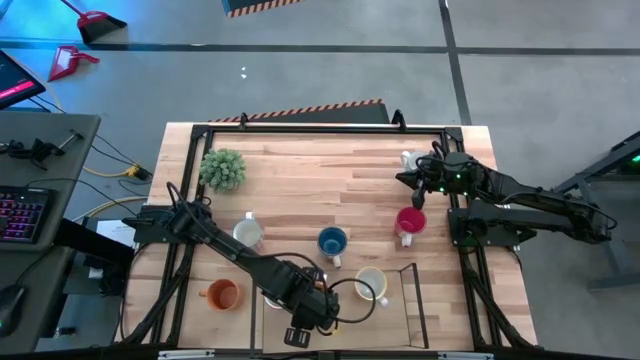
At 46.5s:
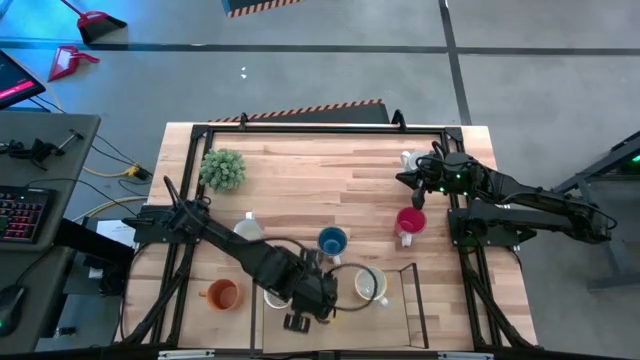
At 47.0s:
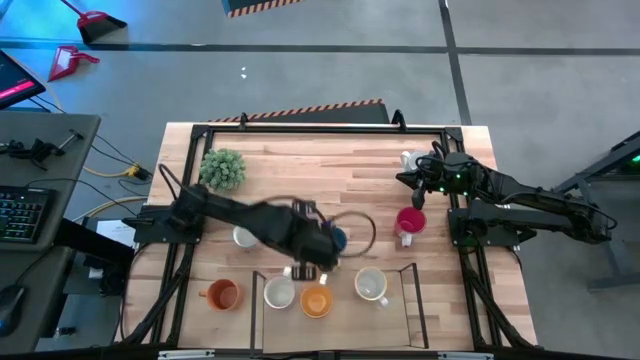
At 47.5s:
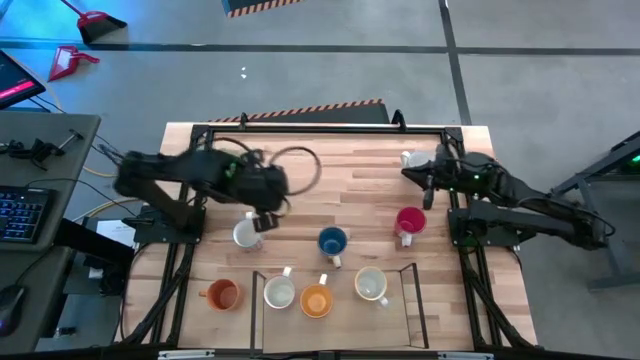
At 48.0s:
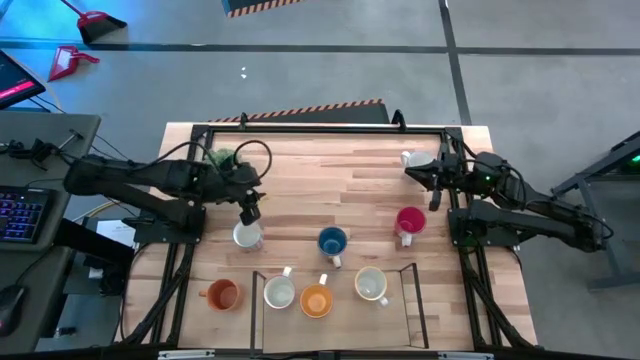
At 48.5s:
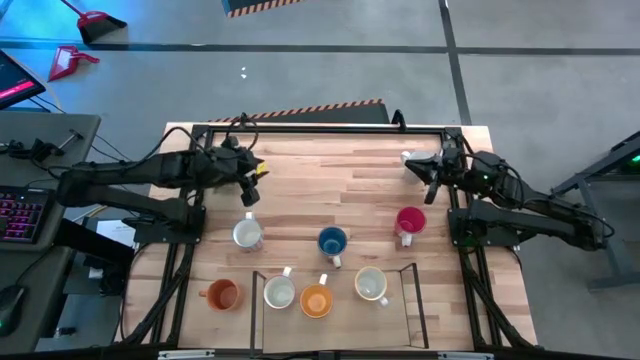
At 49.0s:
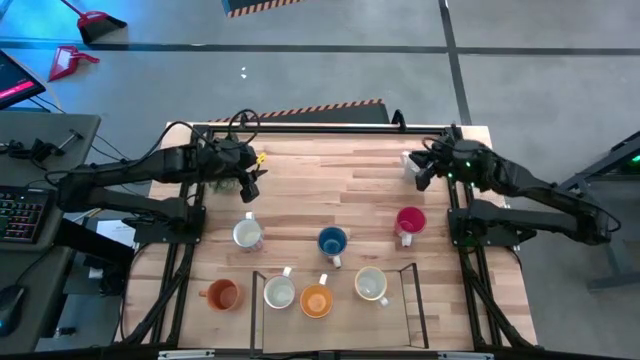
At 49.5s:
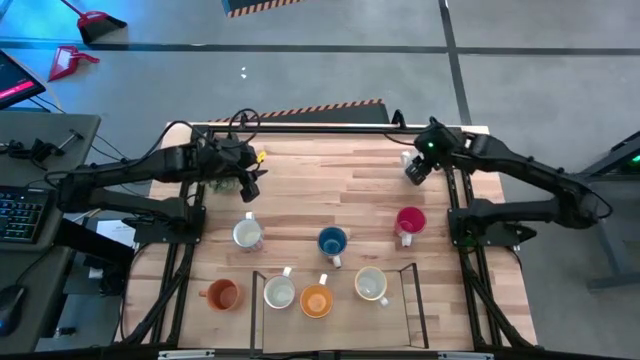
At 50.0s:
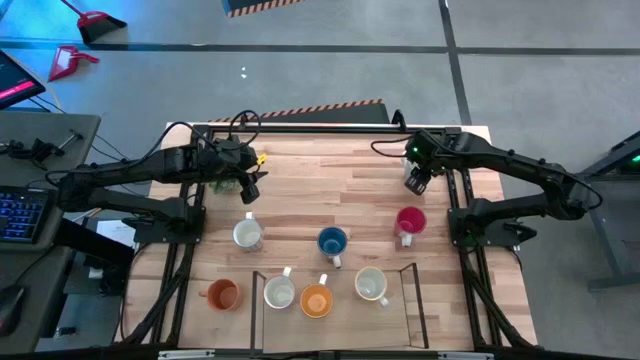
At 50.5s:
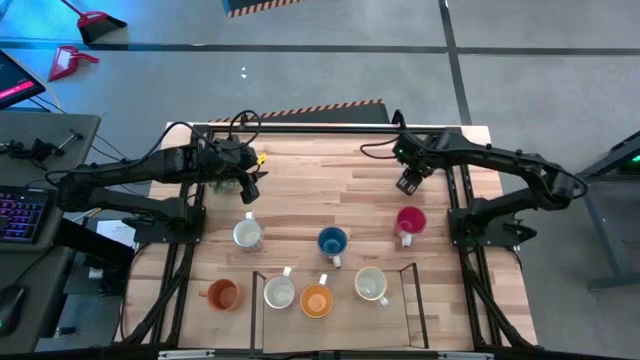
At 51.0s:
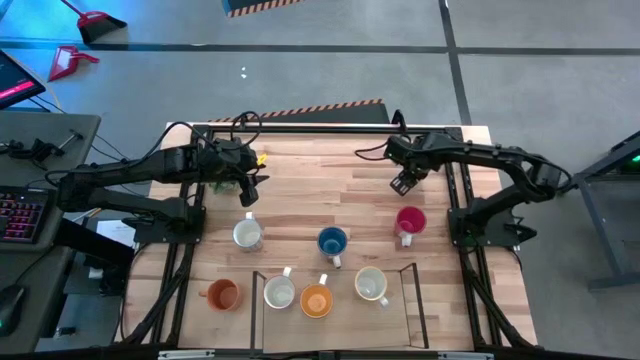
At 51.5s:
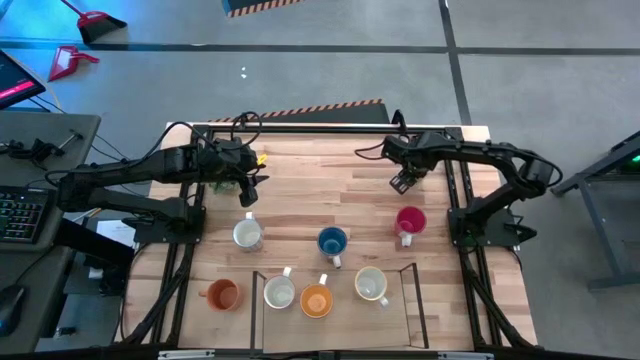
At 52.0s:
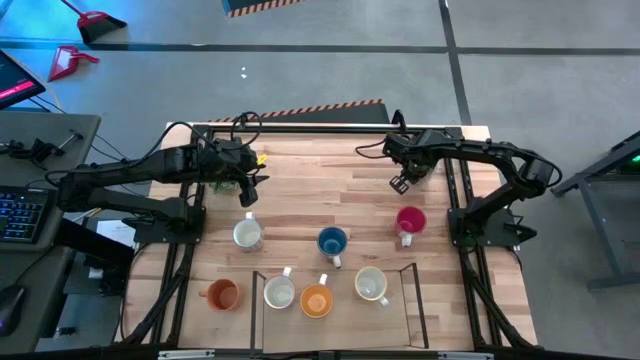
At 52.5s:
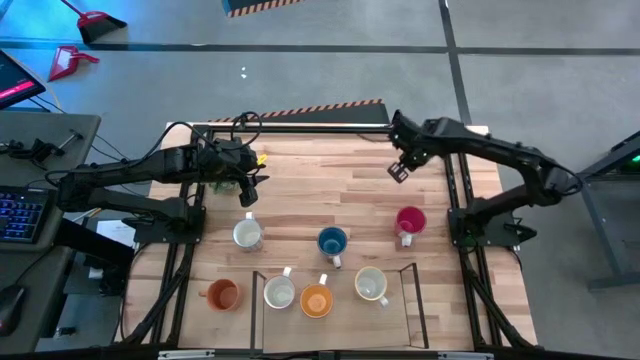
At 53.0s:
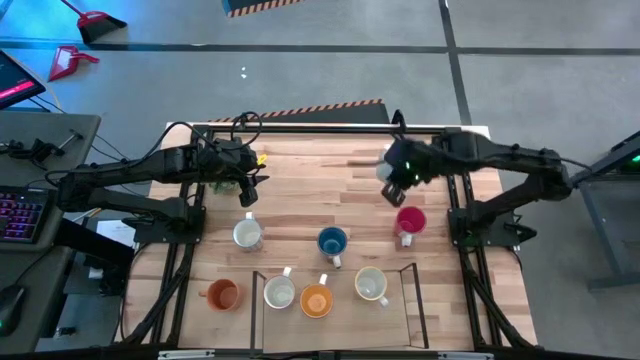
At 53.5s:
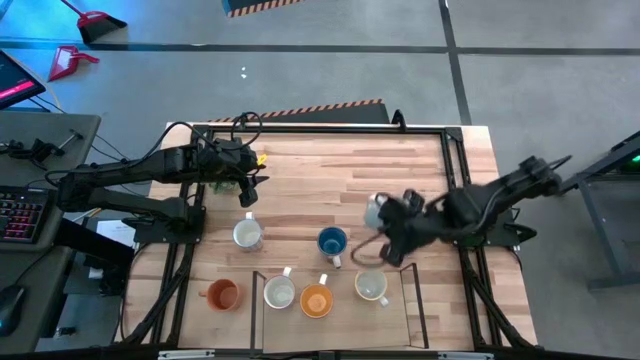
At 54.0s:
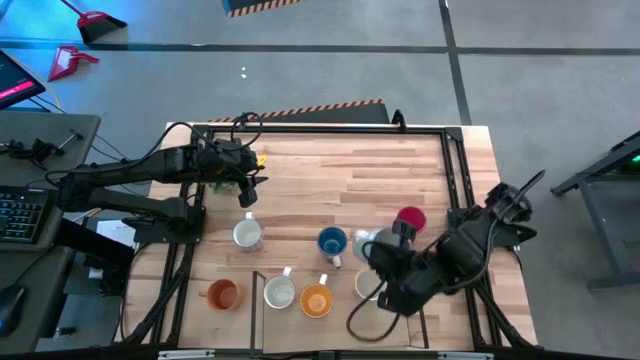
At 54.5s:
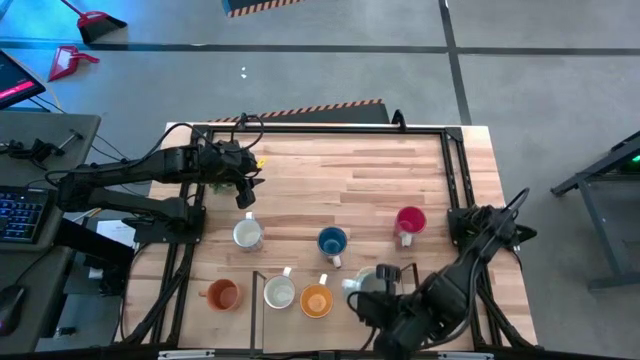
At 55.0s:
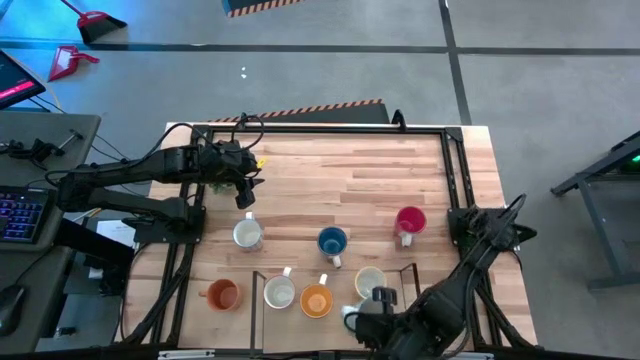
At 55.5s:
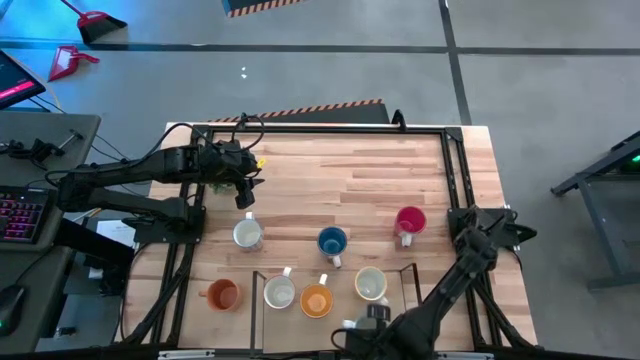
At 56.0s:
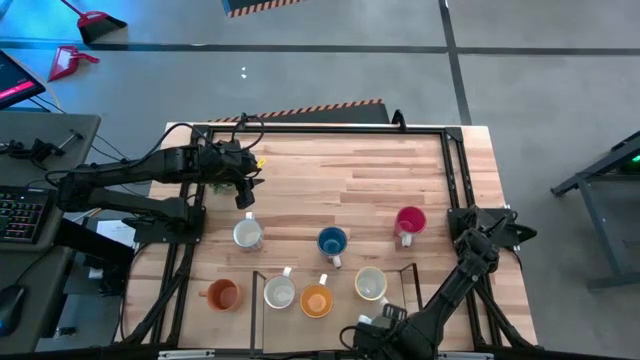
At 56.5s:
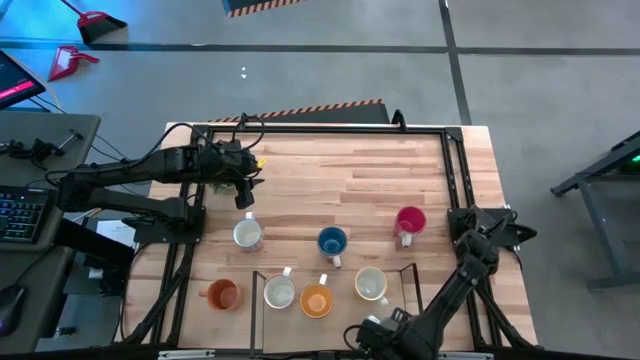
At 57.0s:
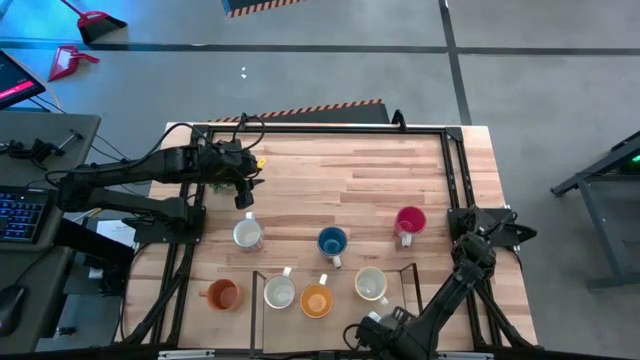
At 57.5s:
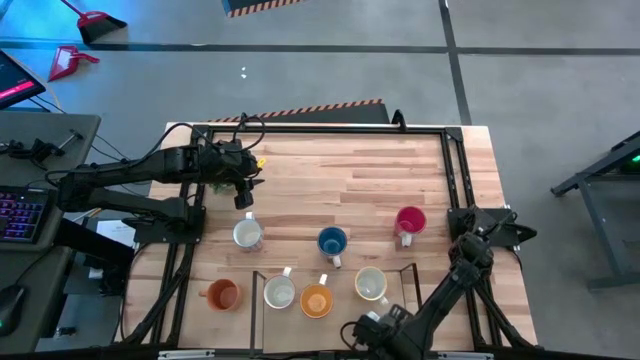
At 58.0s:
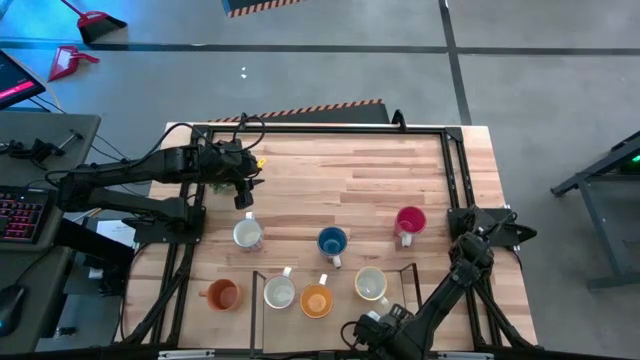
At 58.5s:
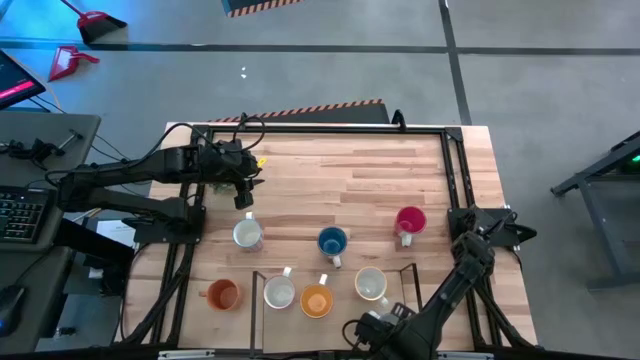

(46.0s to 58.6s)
Task: Place coffee mugs
Put the green pattern cup on the shelf

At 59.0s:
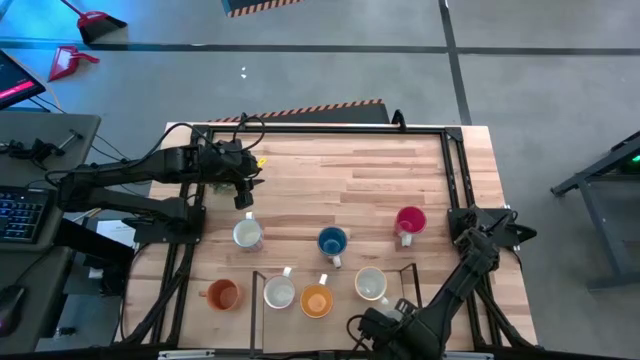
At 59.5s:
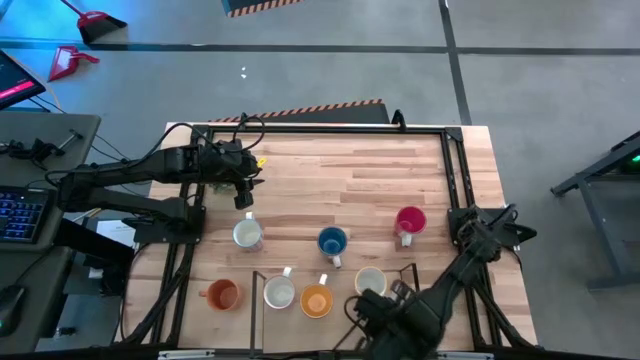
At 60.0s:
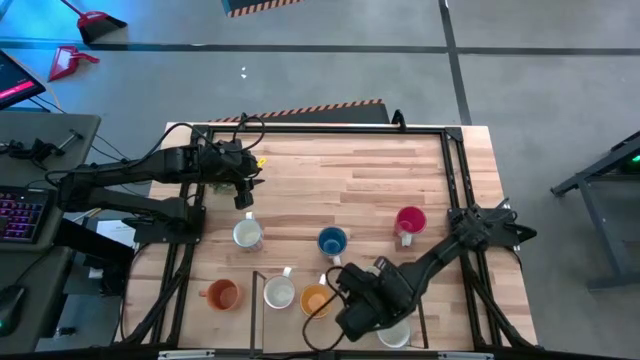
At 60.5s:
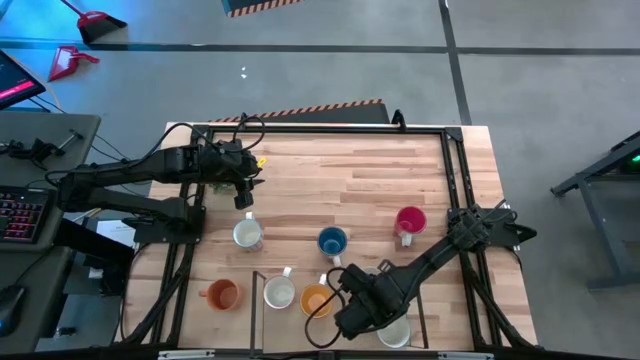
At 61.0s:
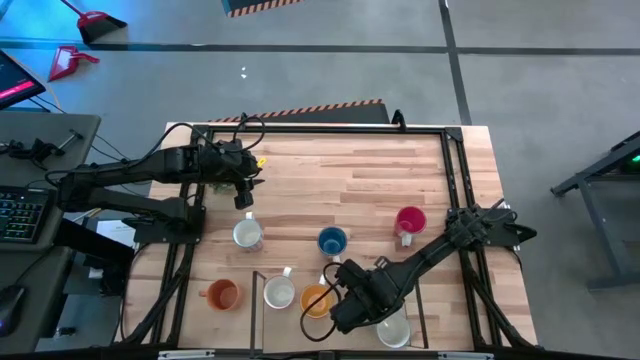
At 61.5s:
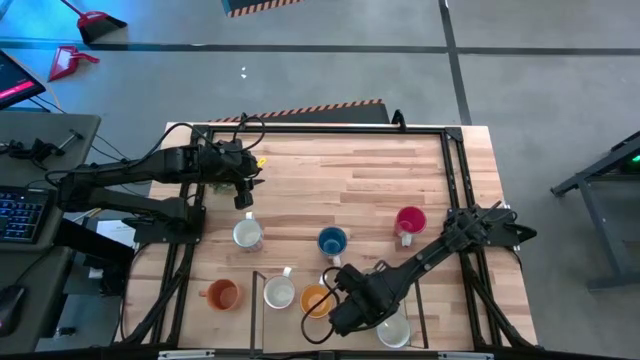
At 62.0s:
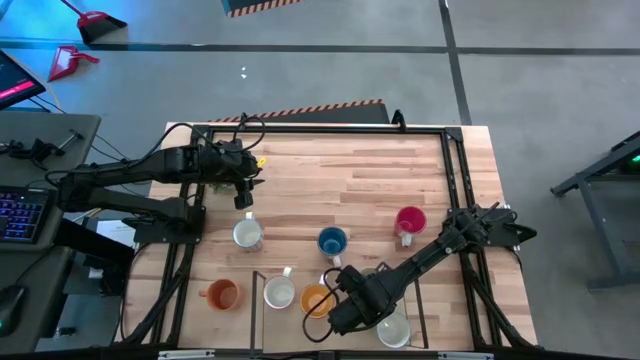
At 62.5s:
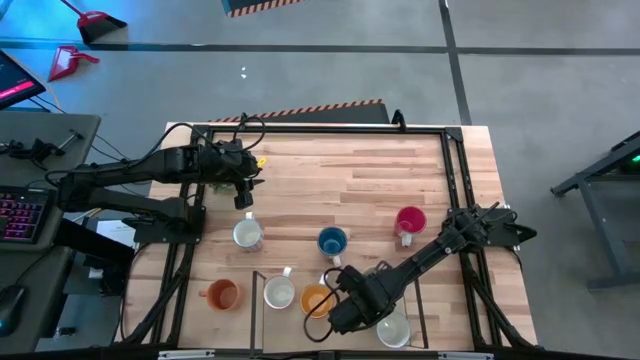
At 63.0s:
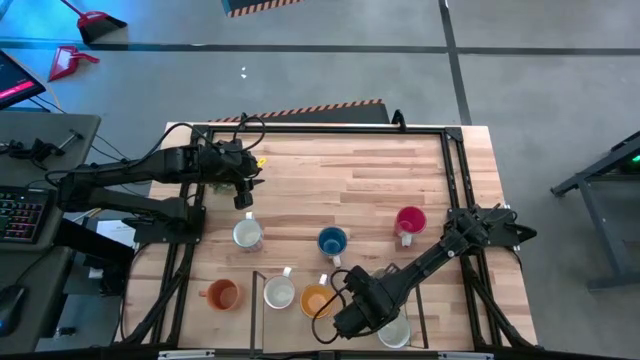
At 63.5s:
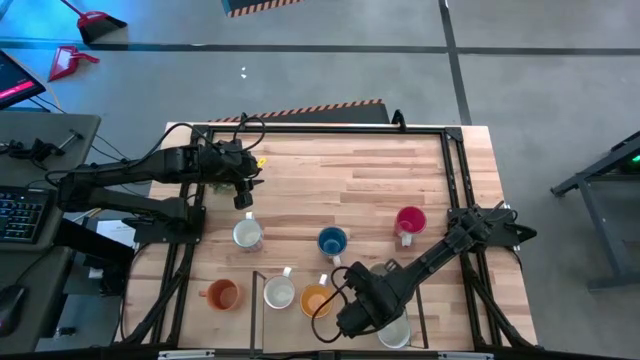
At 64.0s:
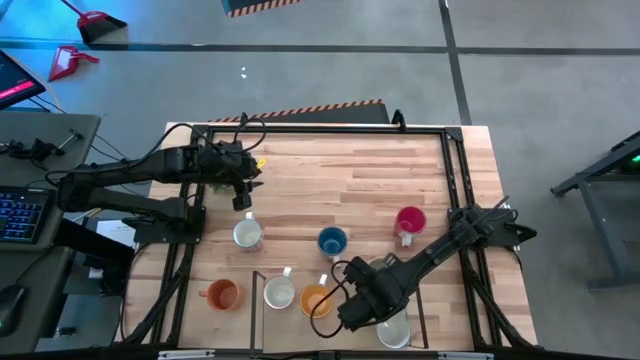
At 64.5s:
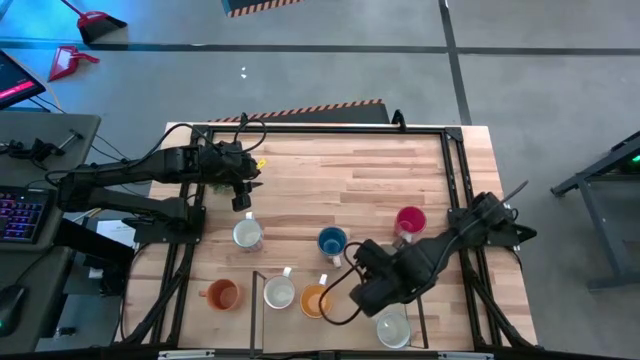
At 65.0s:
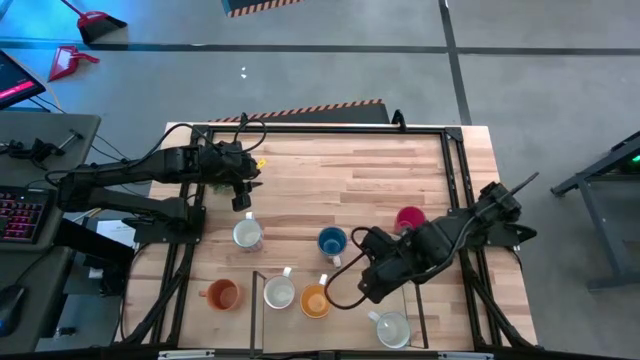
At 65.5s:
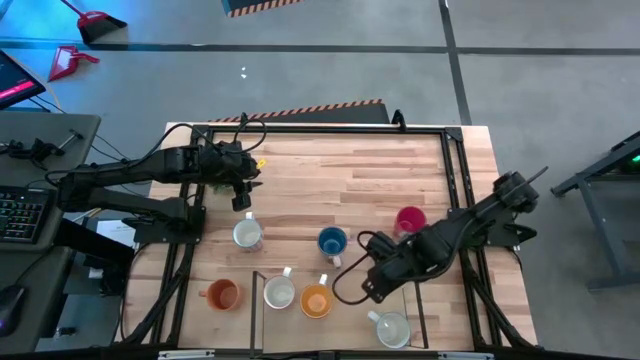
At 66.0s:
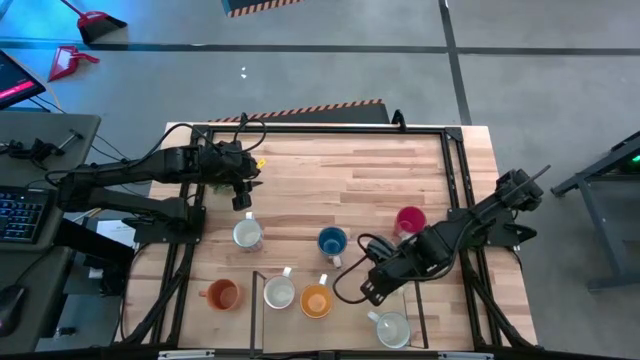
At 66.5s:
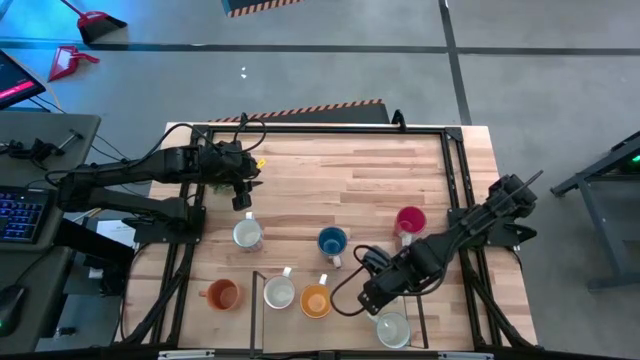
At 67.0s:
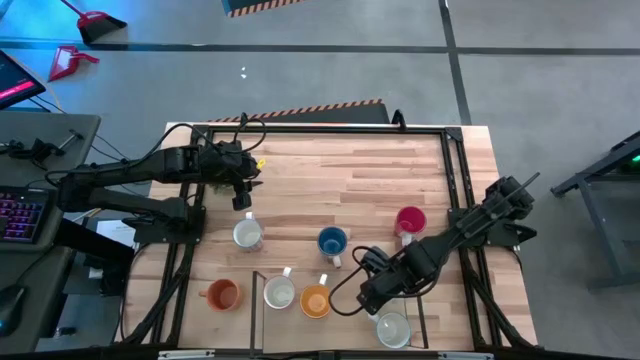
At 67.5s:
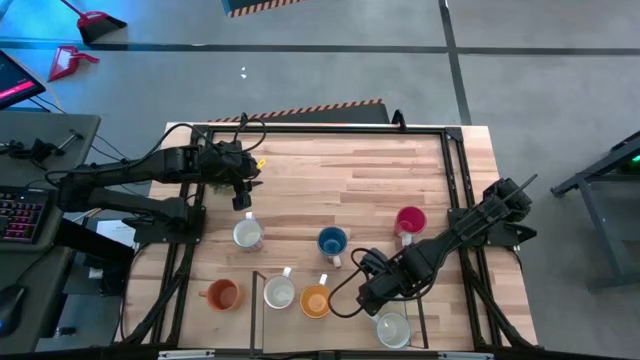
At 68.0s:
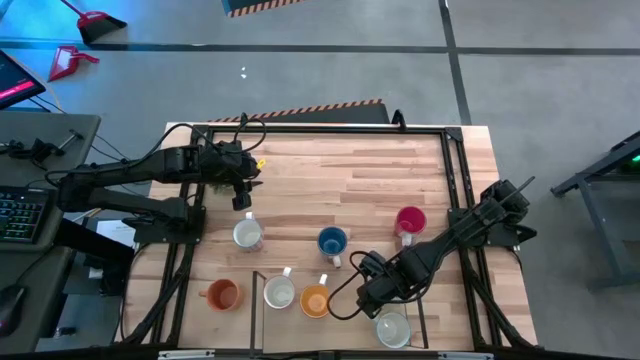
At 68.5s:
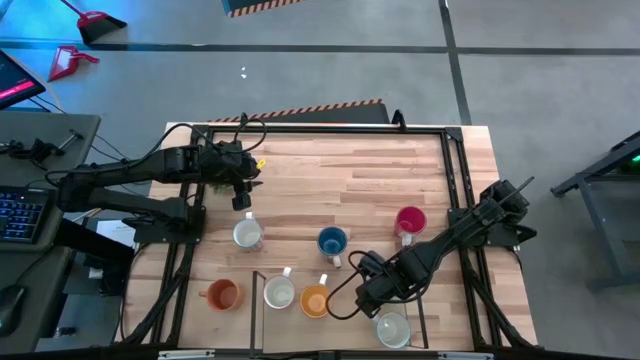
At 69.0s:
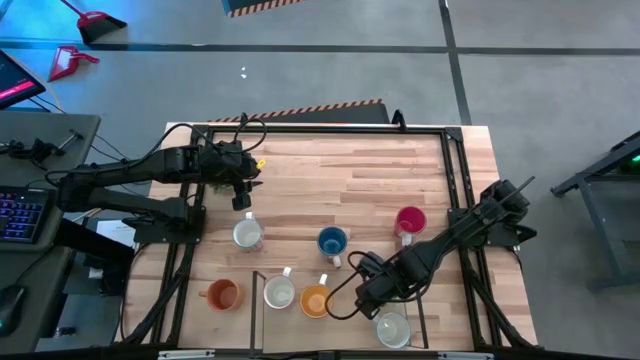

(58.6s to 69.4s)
Adjust the orange pattern cup on the shelf
